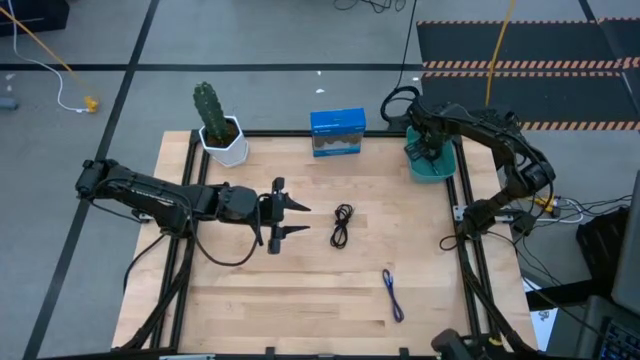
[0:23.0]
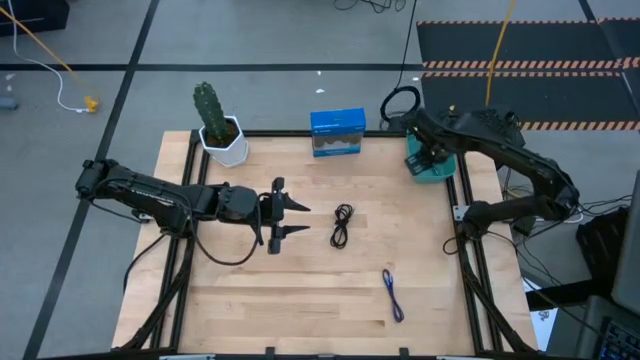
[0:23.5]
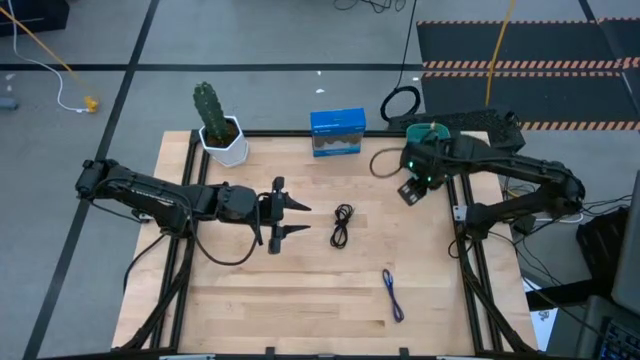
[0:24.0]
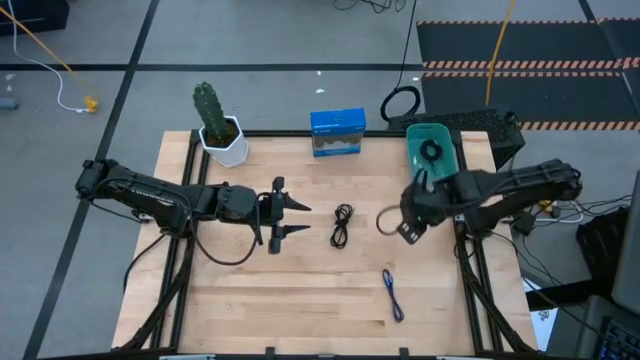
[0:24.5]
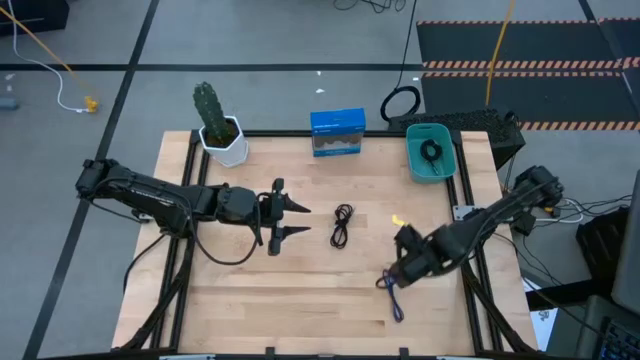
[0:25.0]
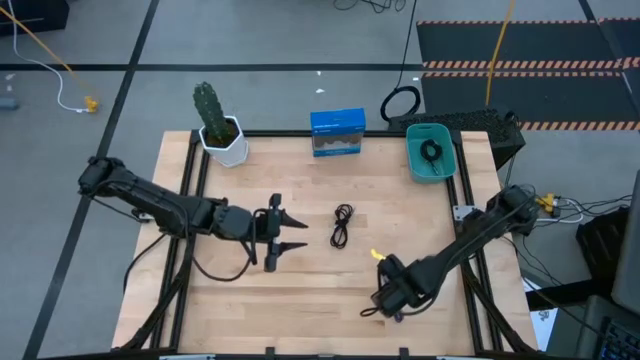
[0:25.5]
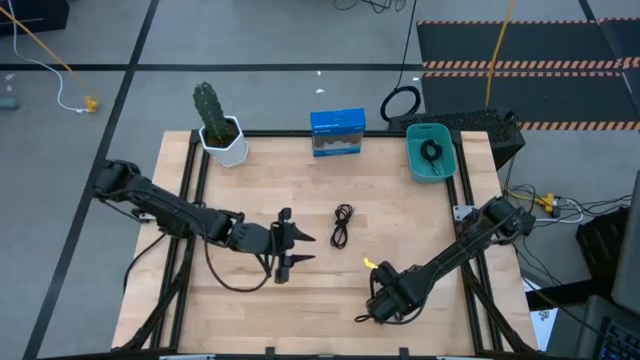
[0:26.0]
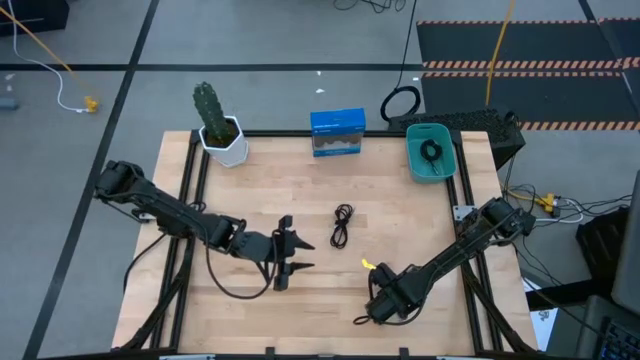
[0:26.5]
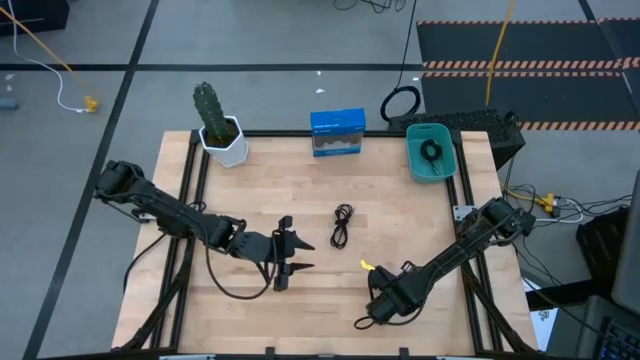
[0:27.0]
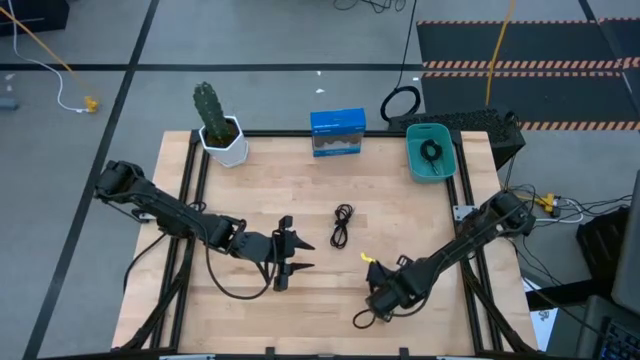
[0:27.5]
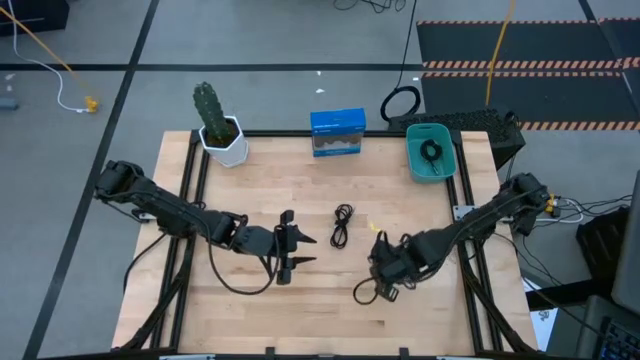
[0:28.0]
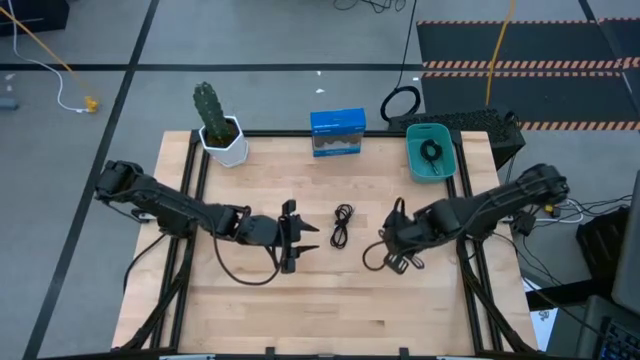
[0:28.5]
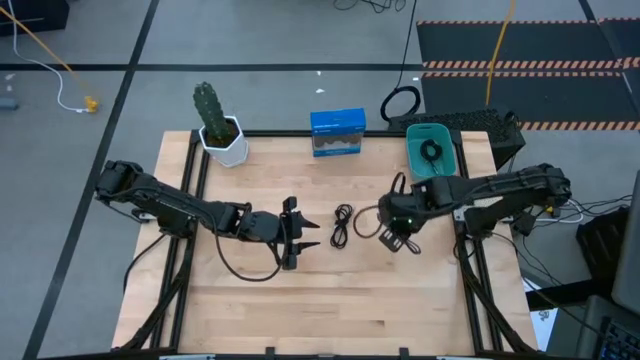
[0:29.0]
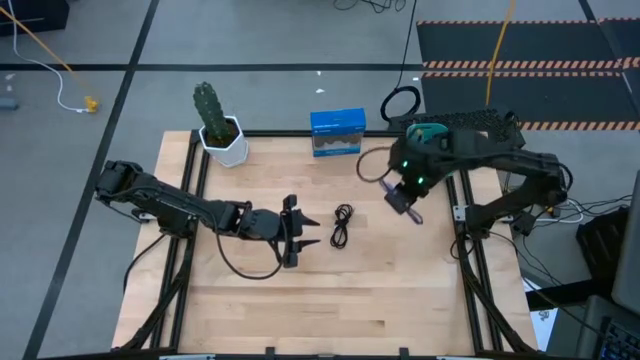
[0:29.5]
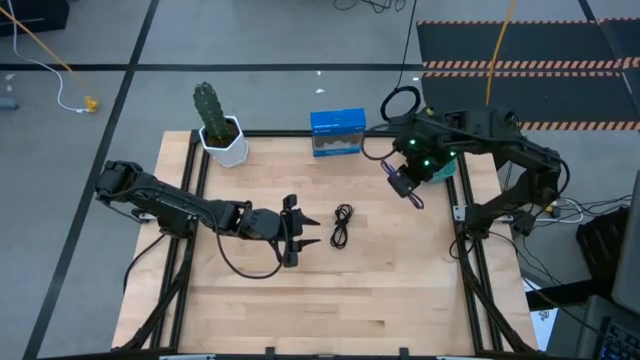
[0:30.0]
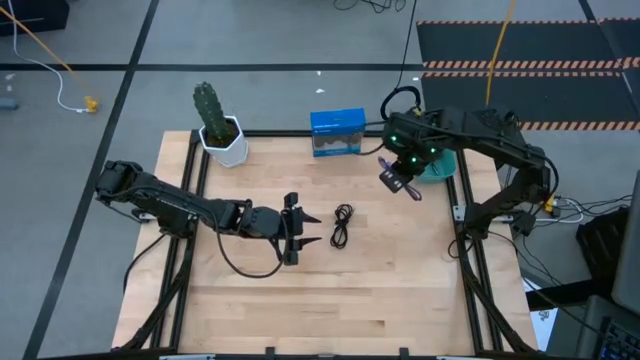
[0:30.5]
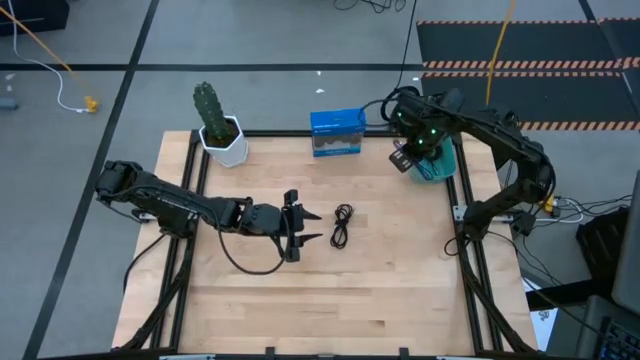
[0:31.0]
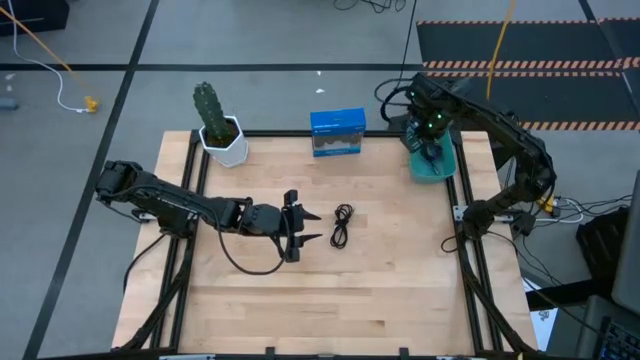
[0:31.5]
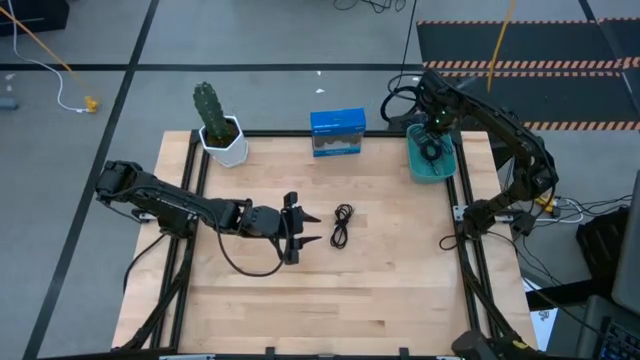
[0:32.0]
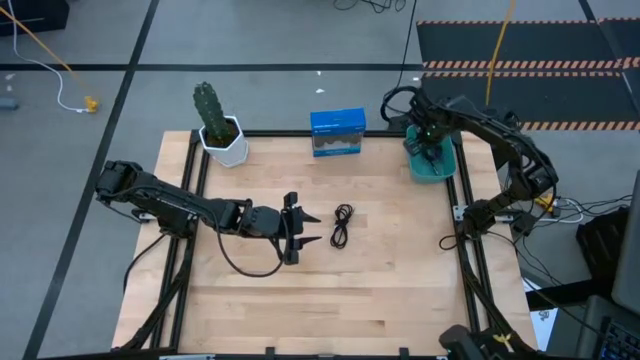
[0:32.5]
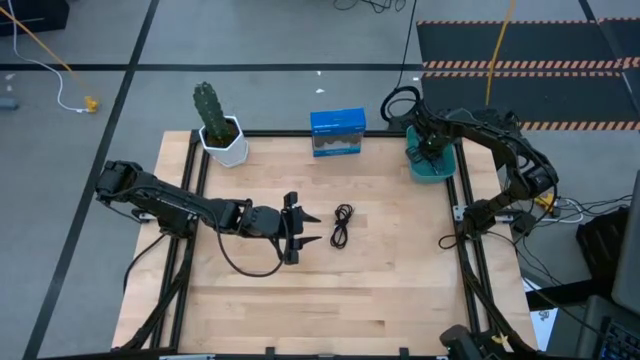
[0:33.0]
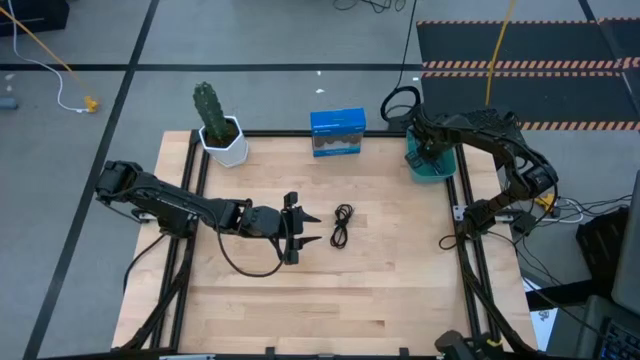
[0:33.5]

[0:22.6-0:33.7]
Task: Pick and place USB-C Cables
Put the black blue USB cable into the blue bin

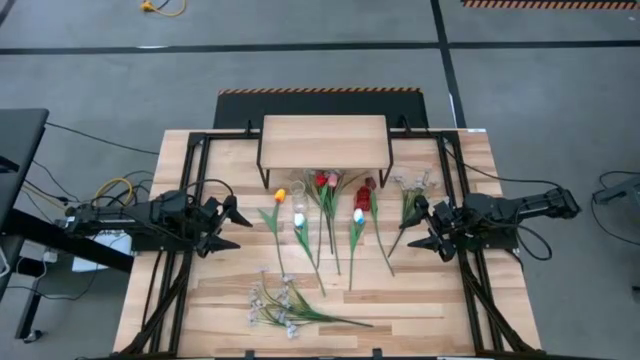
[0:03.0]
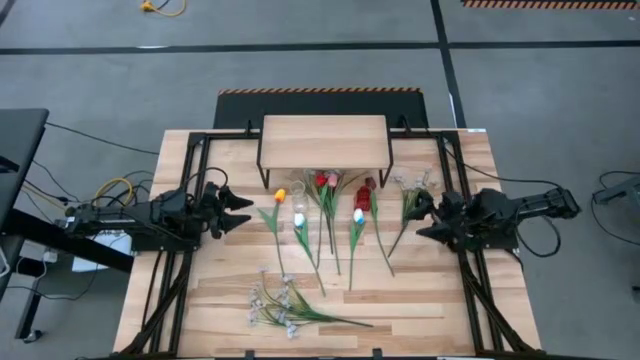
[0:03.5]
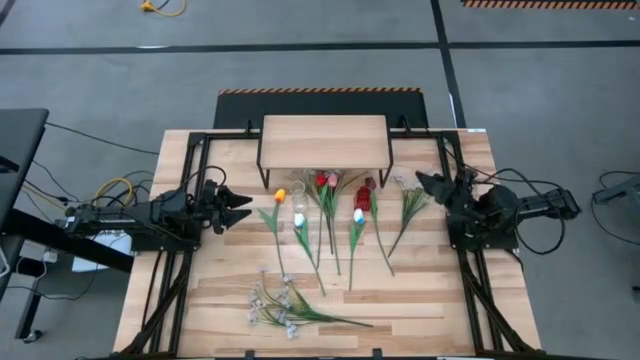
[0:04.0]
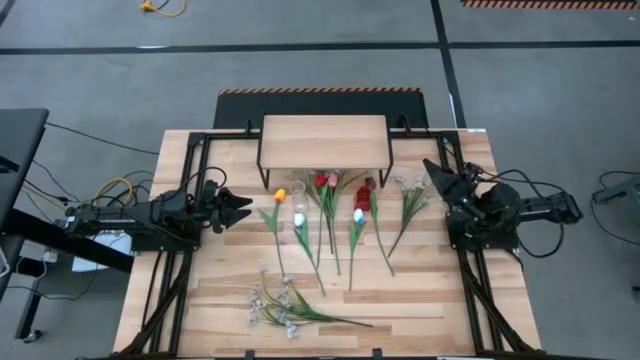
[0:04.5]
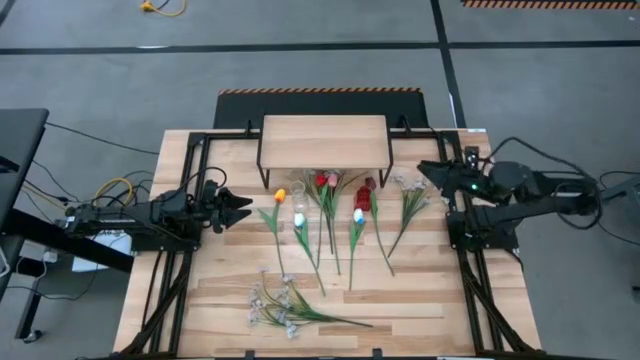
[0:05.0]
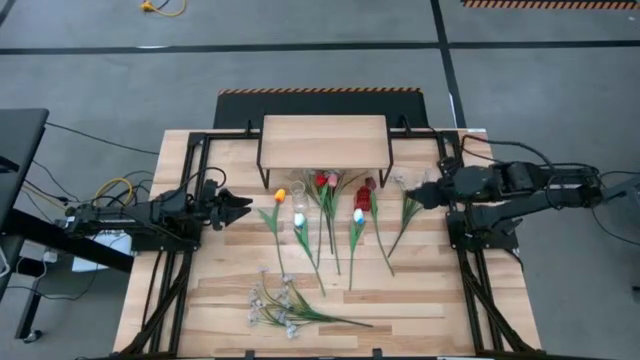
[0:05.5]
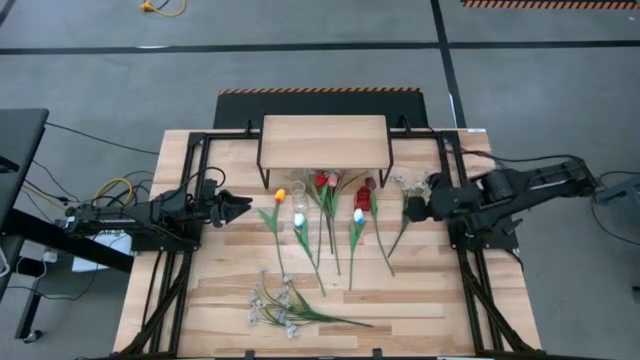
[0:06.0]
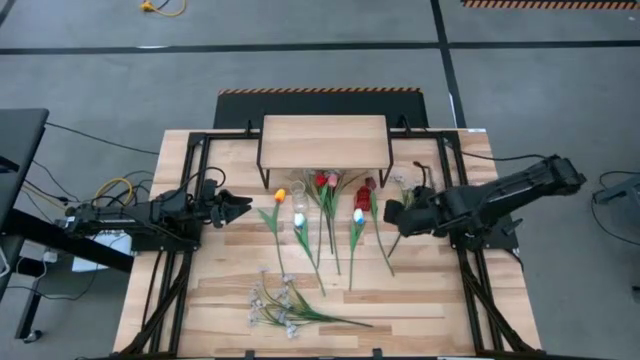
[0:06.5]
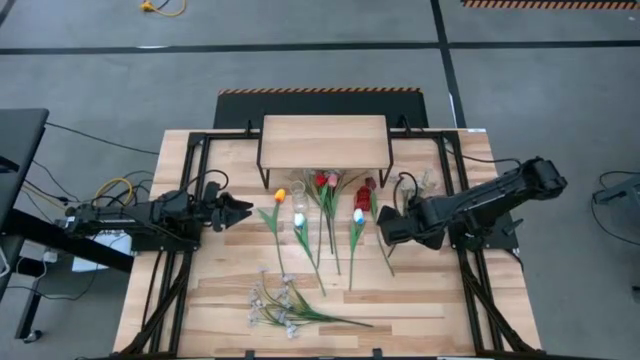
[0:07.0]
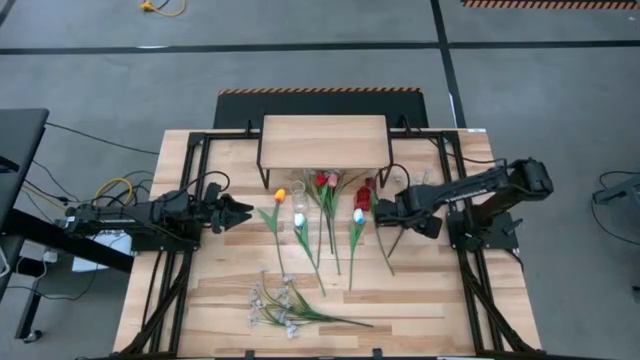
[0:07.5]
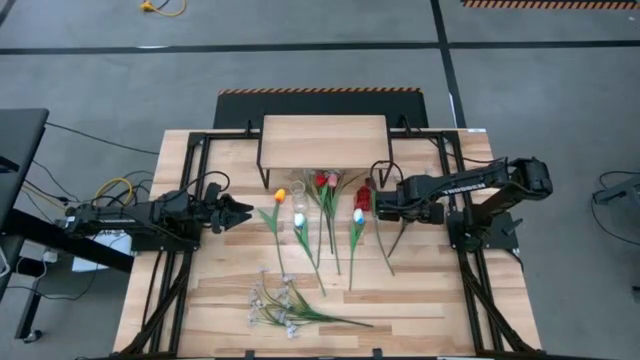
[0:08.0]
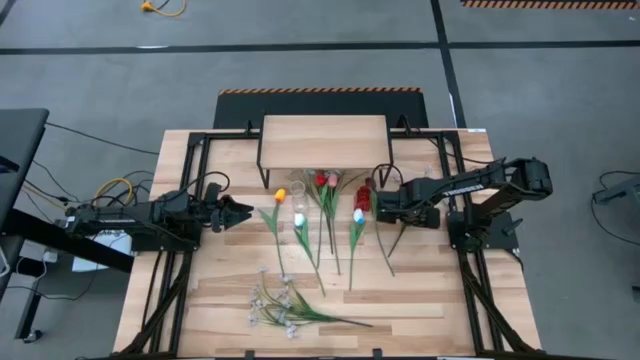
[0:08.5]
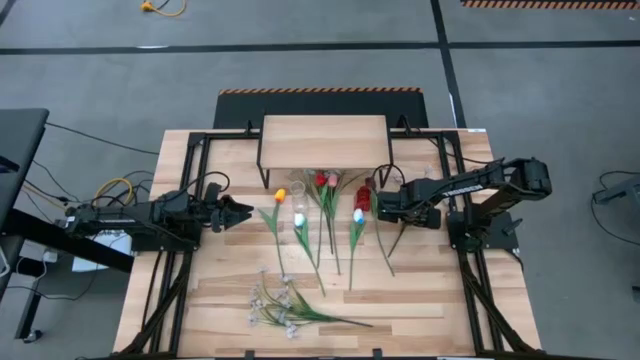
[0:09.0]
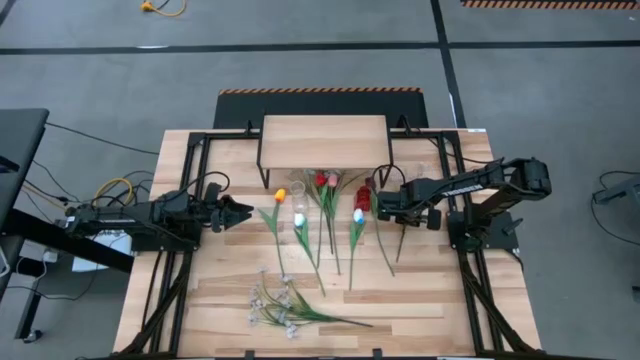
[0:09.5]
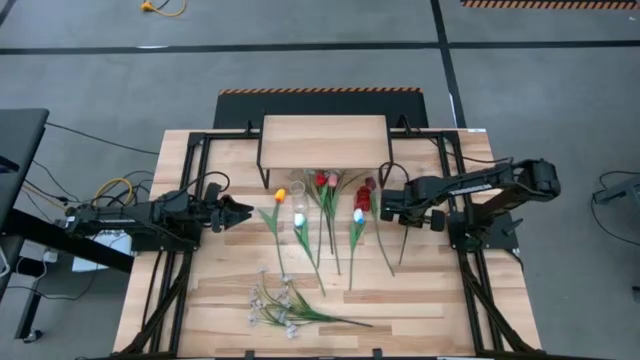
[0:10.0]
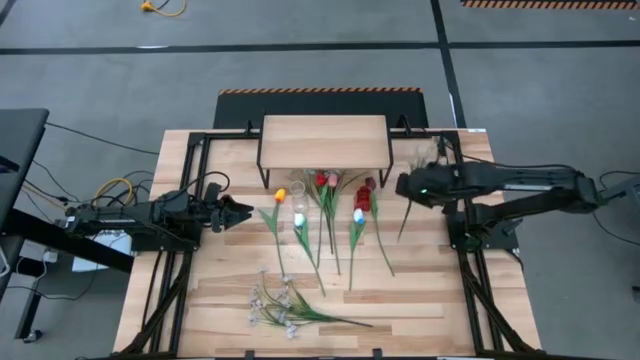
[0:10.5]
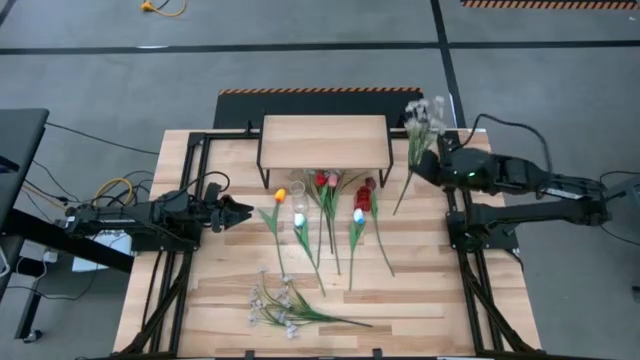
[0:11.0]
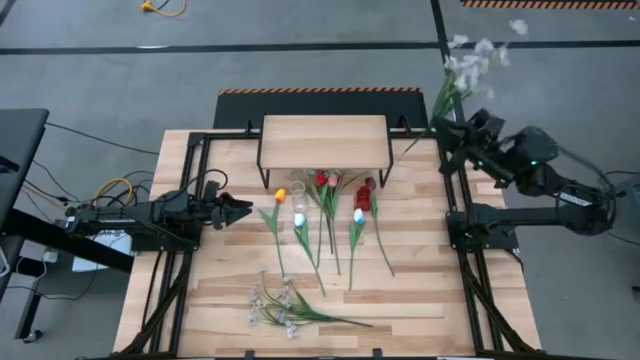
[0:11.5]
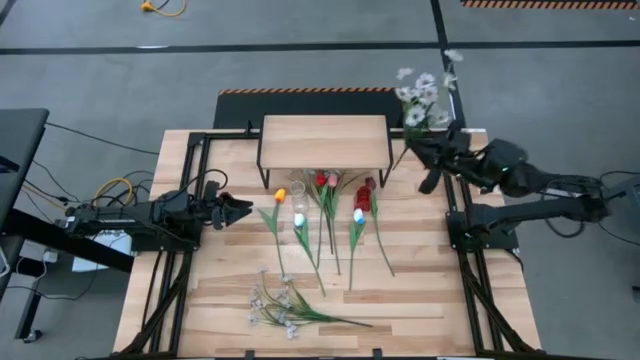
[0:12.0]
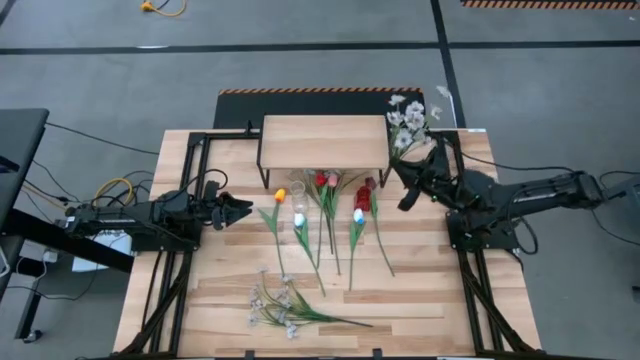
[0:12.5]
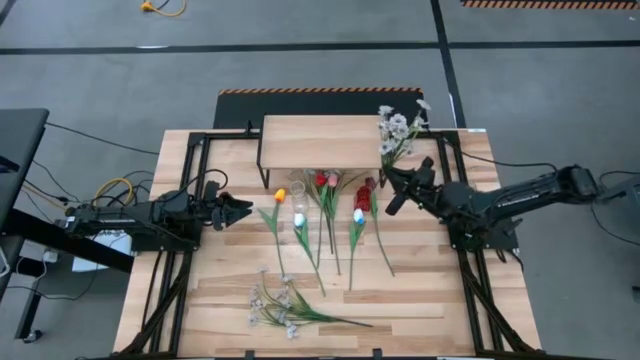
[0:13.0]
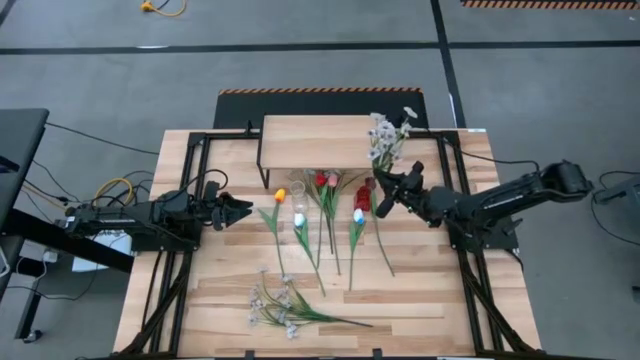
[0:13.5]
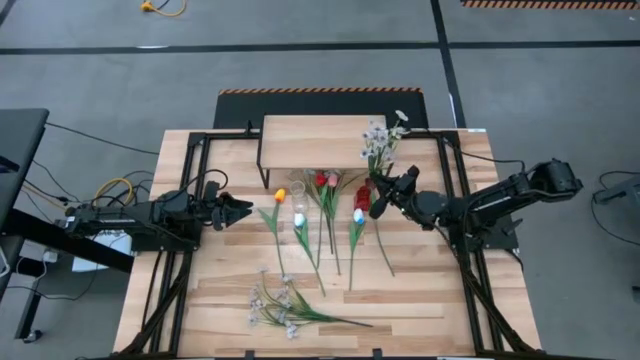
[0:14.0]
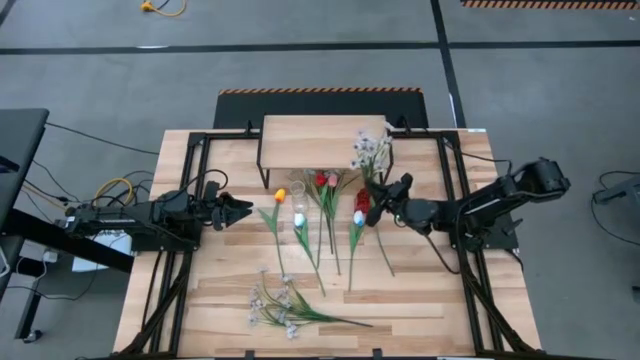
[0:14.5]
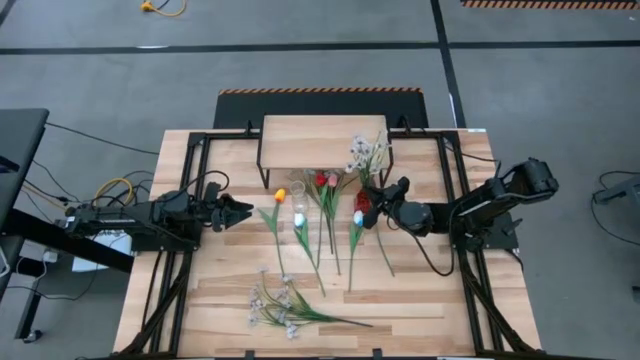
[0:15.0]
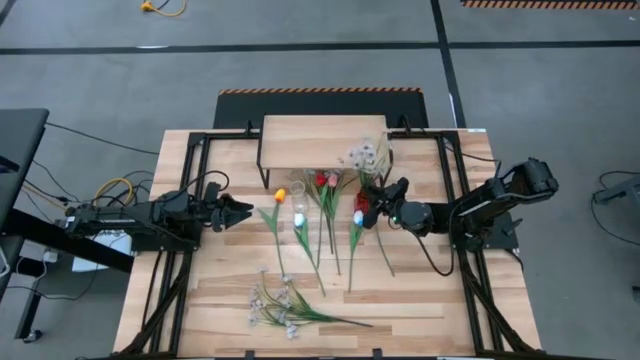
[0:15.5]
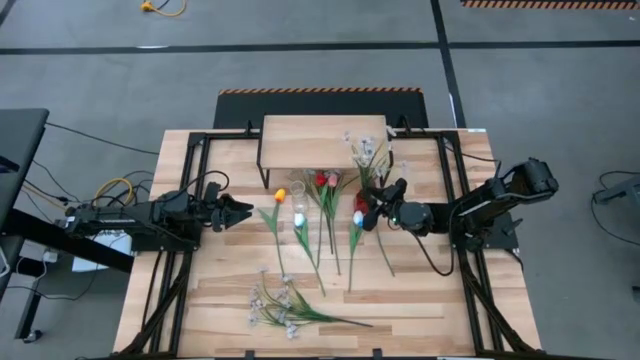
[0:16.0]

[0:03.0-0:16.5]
Task: Pick and place flowers into a vace then onto a shelf
Put the top right white flower into the red vase
